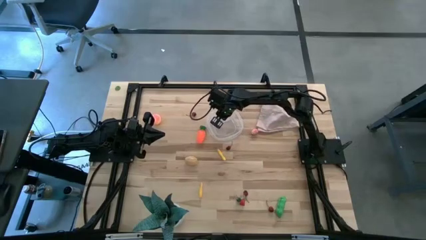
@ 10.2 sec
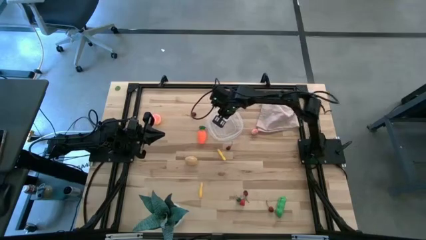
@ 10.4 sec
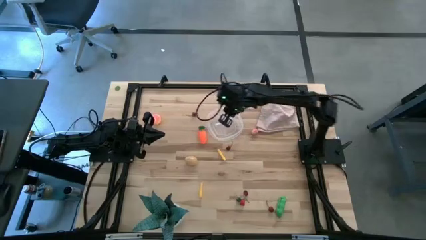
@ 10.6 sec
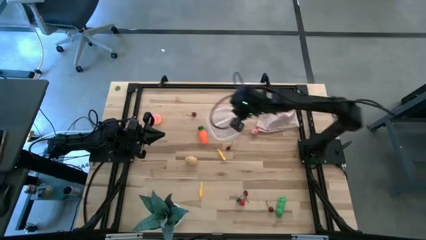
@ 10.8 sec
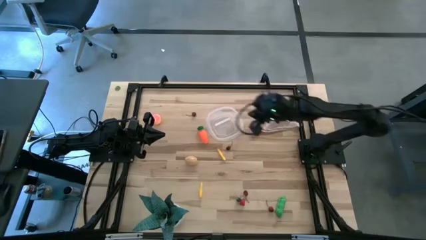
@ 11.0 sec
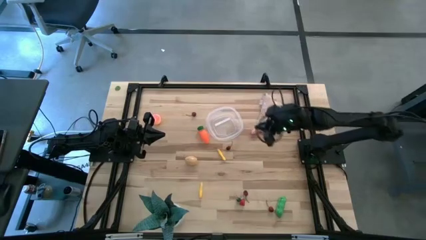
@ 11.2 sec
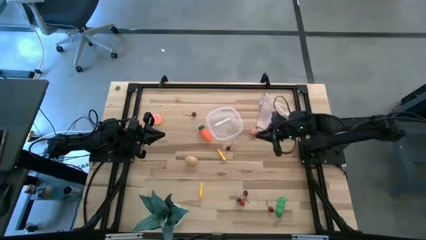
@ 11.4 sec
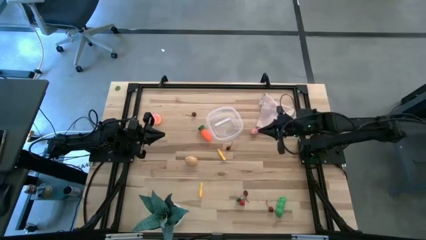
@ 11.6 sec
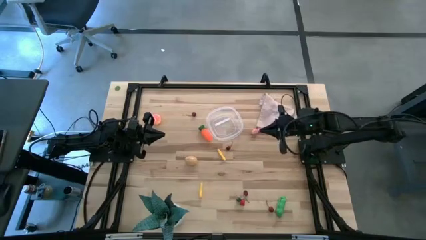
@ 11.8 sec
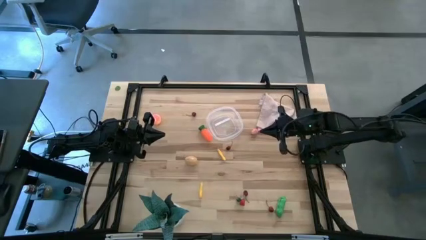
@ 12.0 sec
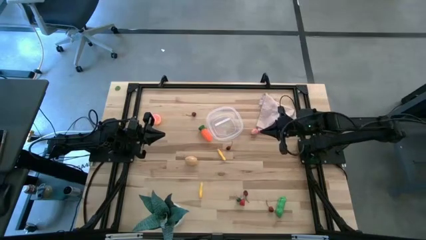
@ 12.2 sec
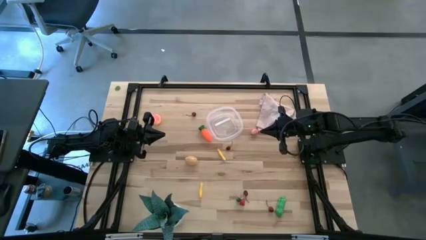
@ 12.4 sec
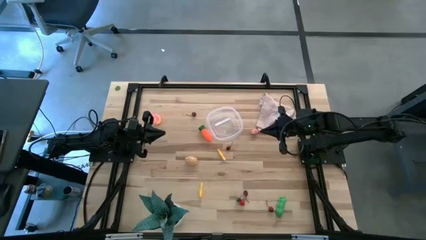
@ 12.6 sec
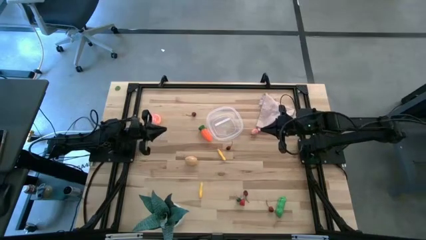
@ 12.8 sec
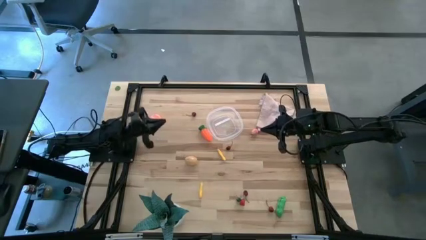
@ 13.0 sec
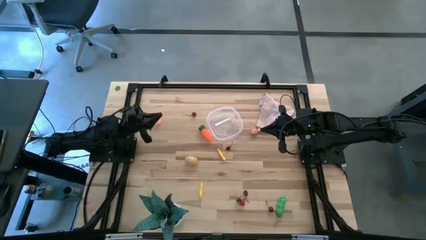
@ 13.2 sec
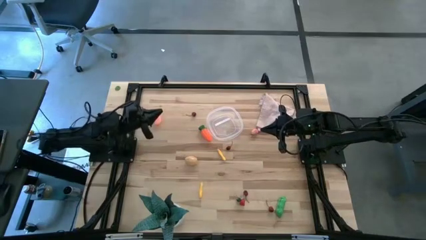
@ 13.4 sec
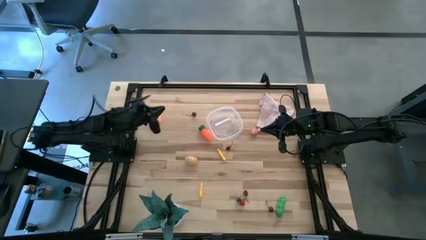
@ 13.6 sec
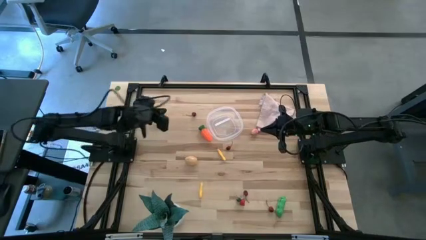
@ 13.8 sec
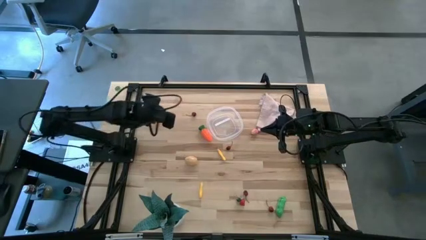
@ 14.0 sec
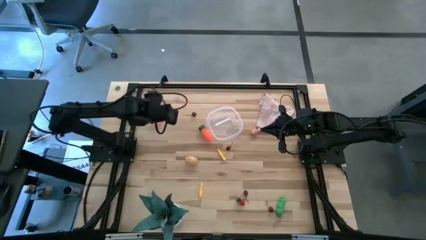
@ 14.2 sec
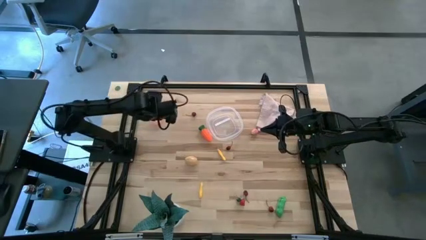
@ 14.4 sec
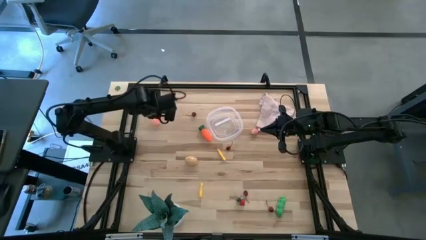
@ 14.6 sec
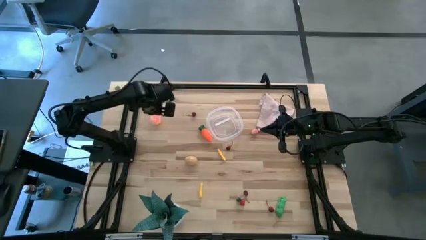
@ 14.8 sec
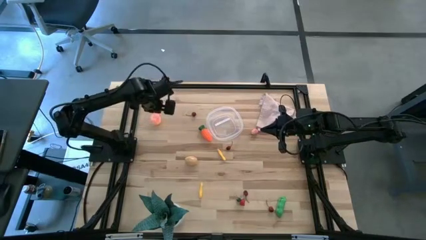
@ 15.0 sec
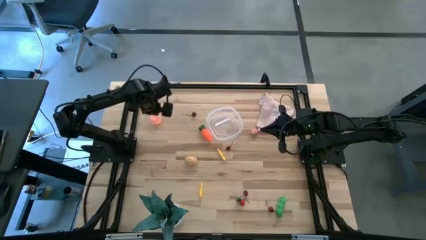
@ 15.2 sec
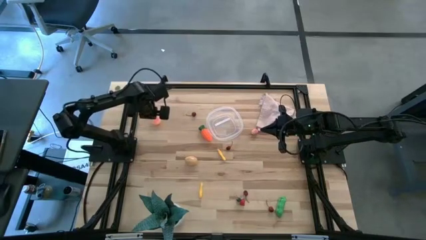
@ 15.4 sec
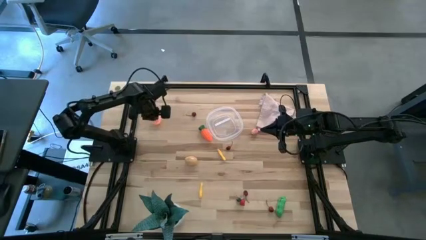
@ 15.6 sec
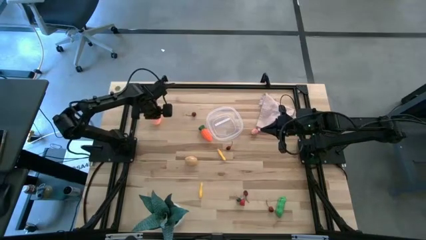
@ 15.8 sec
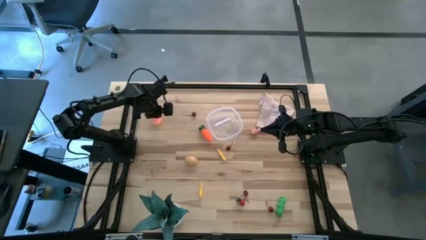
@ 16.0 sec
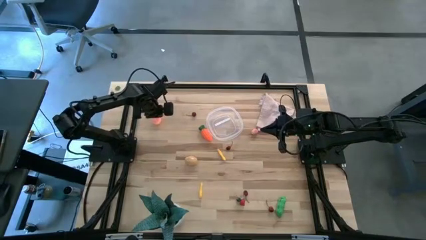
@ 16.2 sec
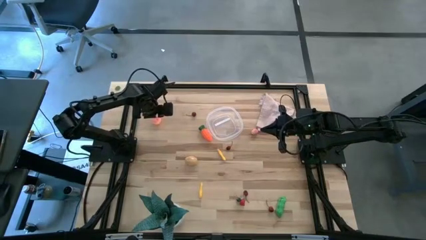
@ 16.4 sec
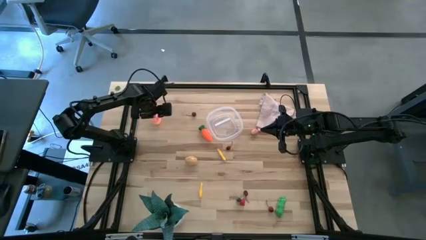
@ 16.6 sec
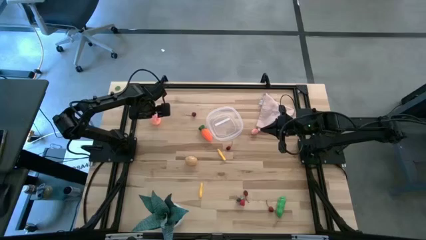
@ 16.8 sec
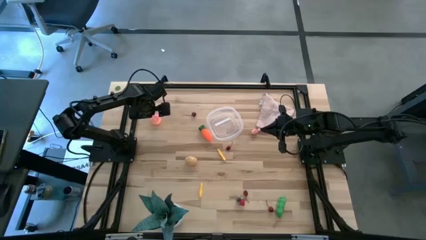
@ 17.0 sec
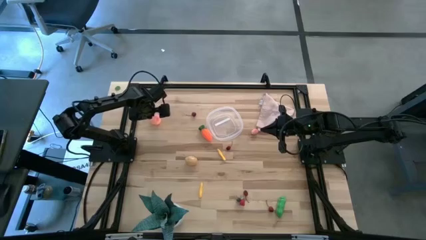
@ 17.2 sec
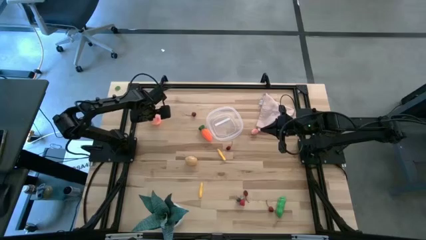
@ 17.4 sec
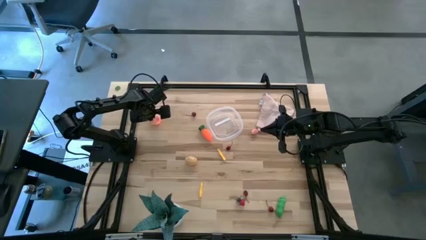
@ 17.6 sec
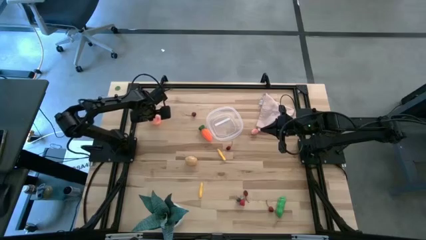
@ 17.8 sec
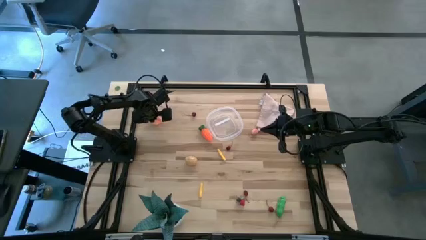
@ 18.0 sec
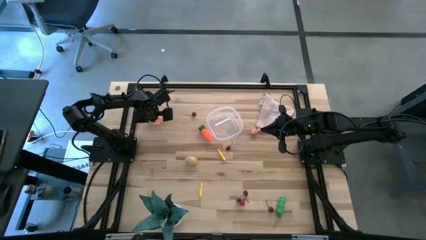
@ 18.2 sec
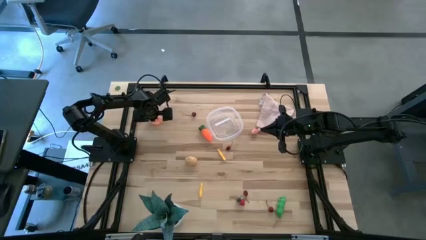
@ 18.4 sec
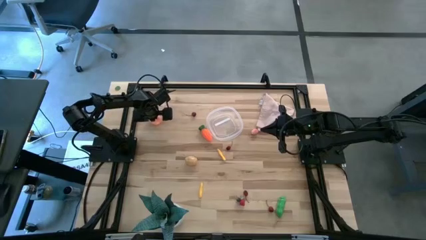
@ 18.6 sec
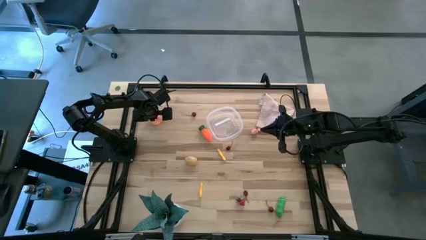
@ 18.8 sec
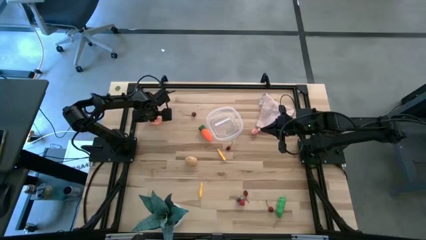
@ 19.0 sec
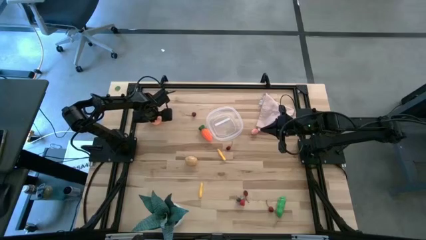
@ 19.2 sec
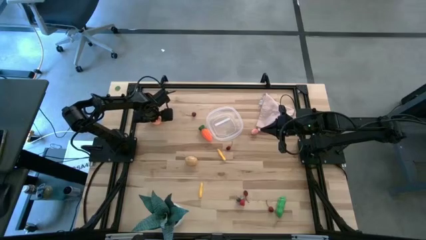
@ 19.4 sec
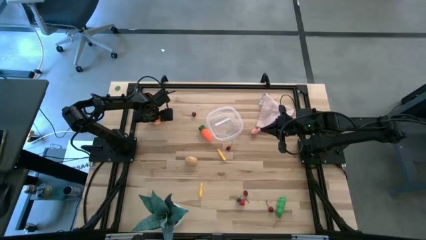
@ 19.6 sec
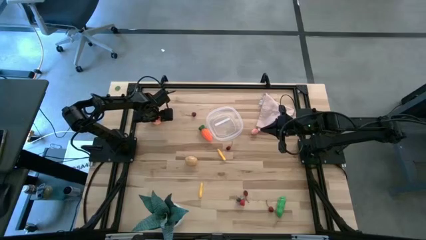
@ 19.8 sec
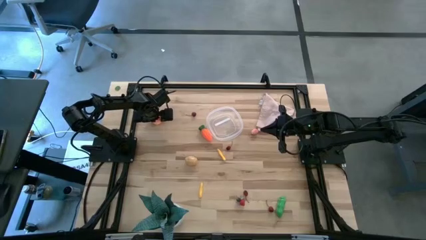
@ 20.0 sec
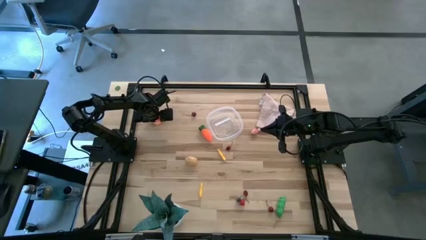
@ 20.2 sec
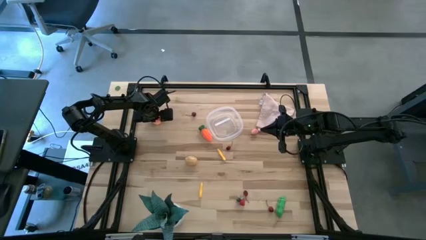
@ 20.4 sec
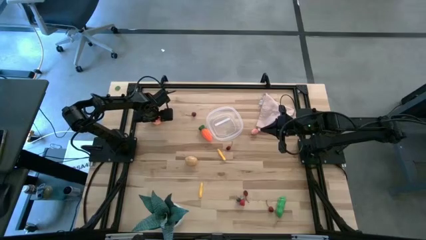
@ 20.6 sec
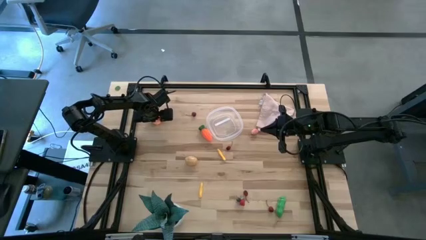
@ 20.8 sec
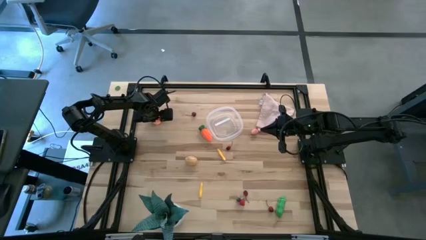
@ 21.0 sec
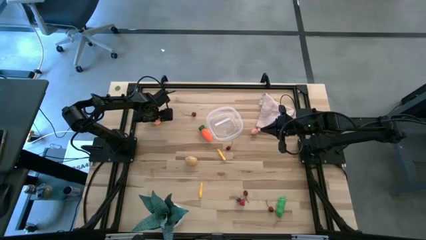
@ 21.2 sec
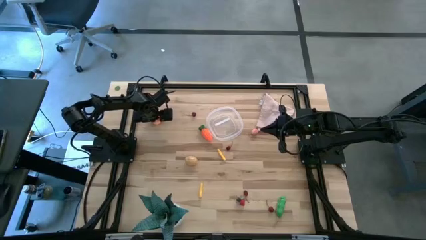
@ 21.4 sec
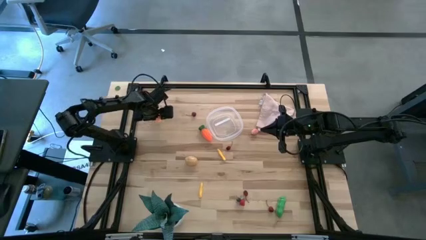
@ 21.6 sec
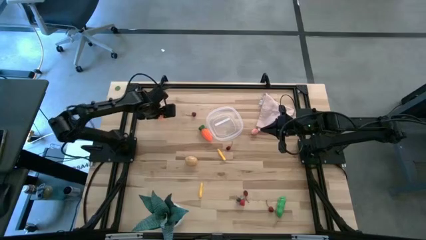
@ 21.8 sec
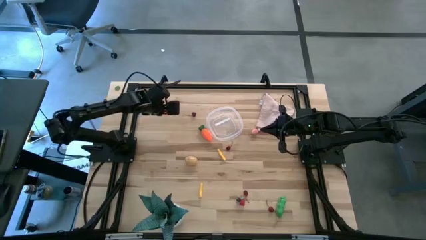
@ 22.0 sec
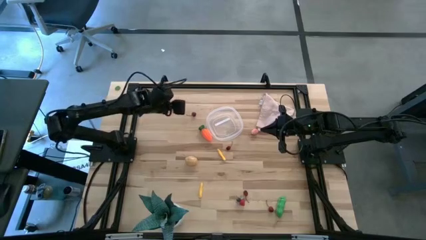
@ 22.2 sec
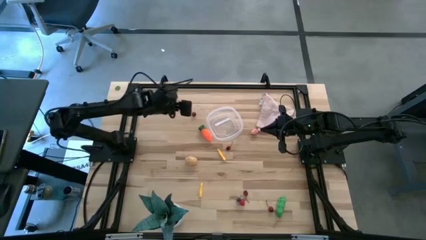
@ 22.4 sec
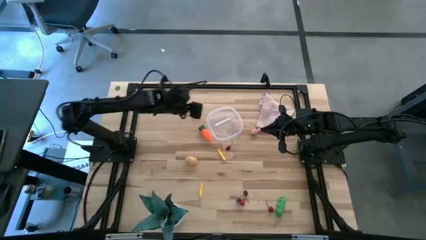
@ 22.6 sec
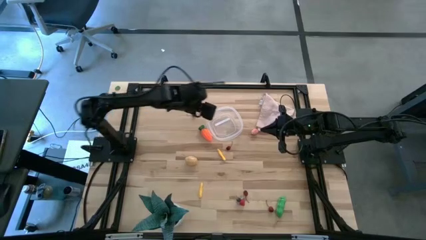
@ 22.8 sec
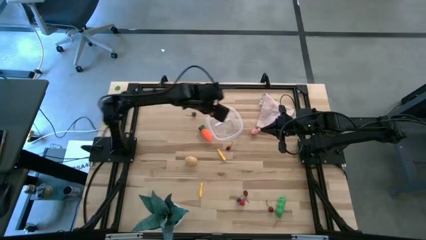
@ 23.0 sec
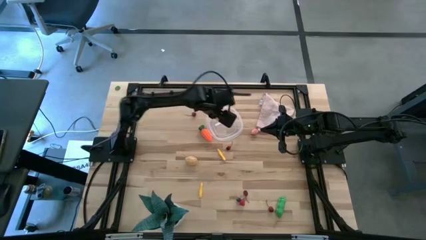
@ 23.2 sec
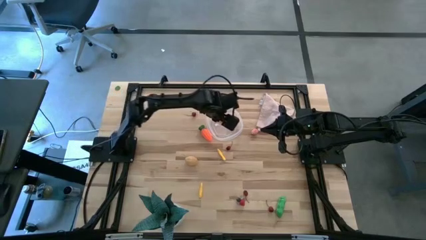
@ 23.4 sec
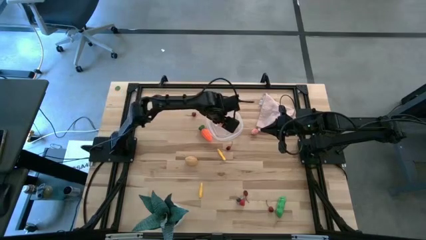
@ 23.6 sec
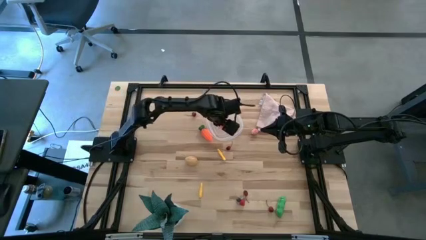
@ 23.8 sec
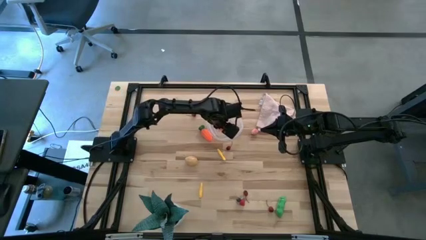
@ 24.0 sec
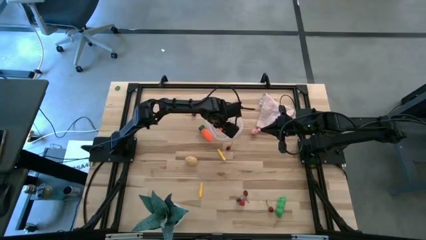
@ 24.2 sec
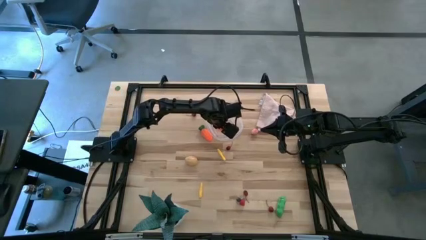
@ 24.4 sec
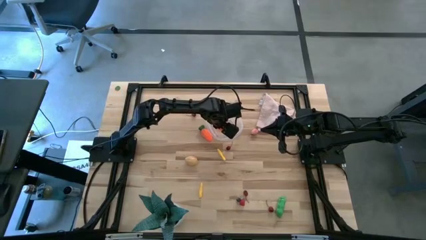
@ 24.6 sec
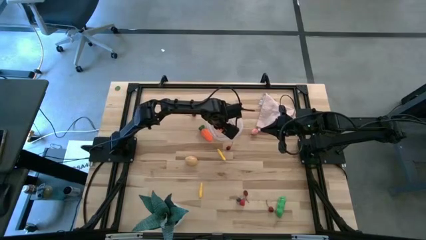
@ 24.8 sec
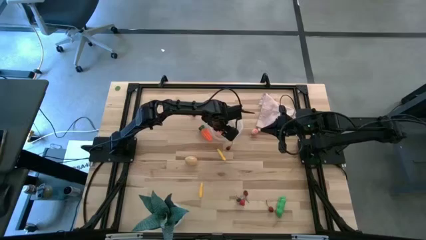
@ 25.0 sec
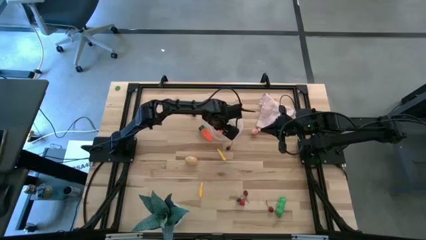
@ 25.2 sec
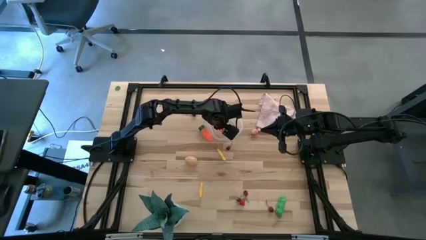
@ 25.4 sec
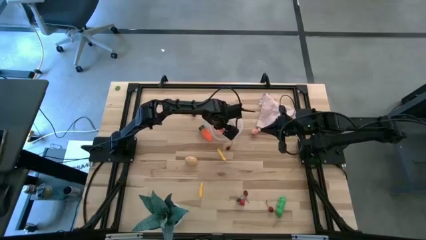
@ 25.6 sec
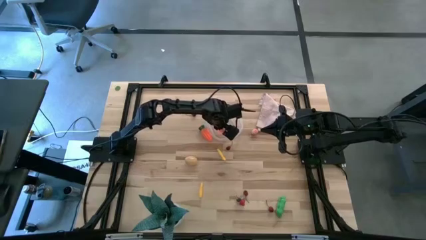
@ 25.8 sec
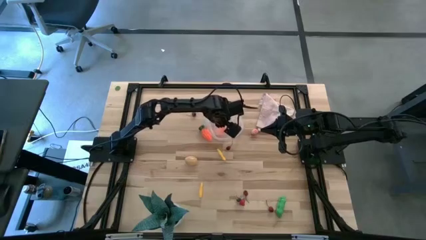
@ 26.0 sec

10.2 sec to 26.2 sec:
Task: Pick and placing Produce into tupperware
Put the pink peach into the transparent bin

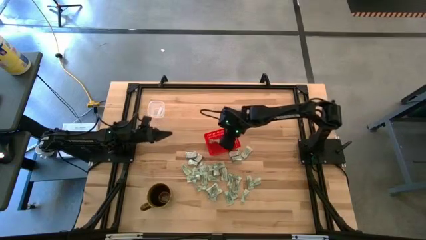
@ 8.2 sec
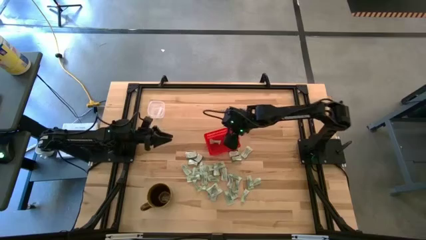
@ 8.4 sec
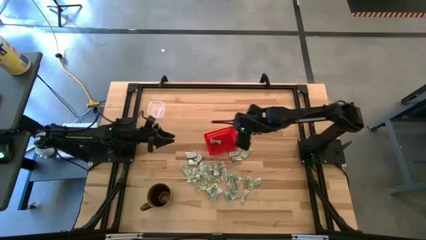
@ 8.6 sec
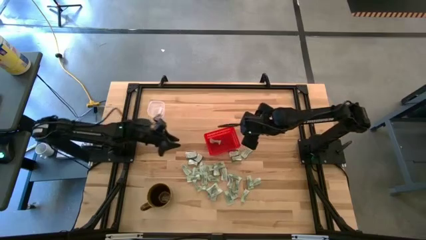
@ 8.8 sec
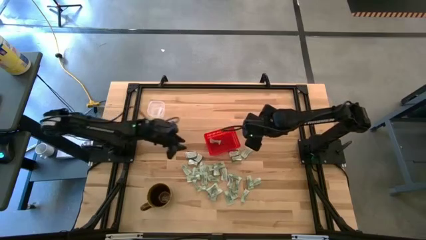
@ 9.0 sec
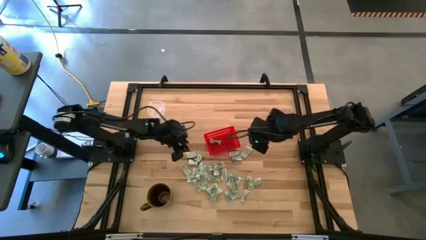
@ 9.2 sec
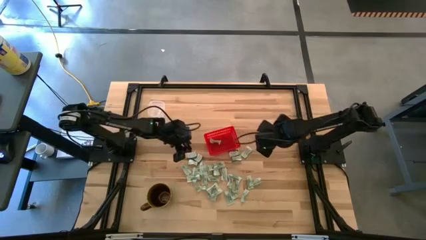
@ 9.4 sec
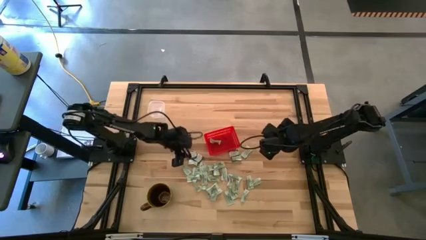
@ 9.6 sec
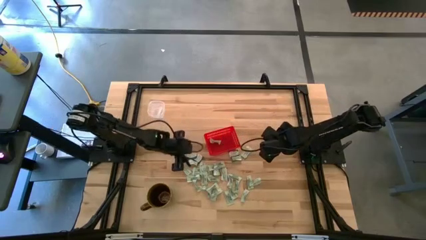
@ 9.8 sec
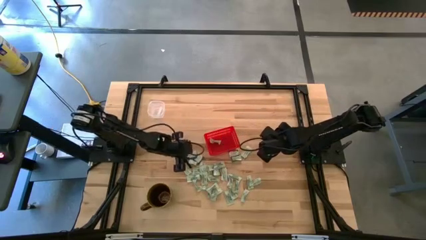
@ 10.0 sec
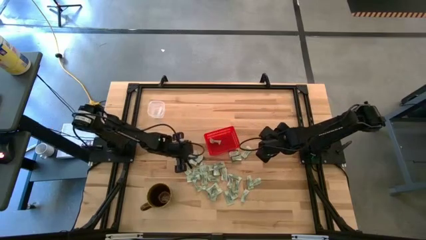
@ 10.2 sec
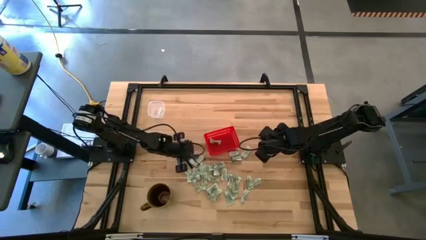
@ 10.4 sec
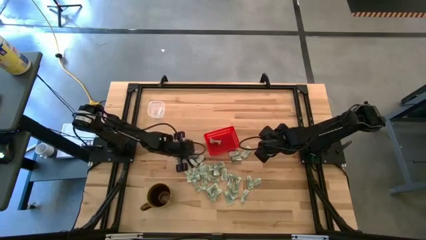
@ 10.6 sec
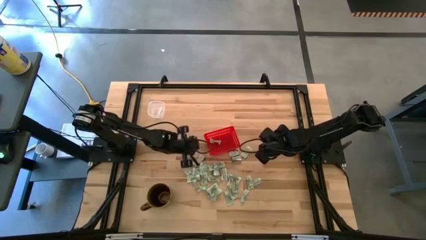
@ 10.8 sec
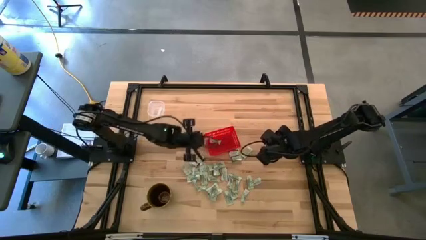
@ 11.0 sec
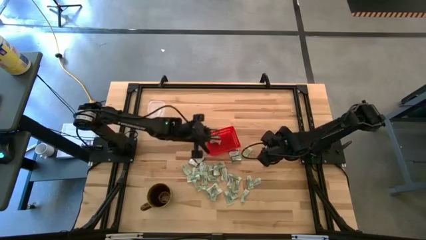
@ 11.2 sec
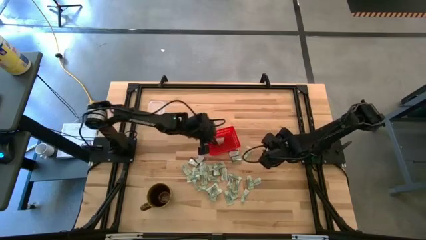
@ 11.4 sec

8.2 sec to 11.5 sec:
Task: Pick and place items into bin
Put the white truvia packet into the red bin
